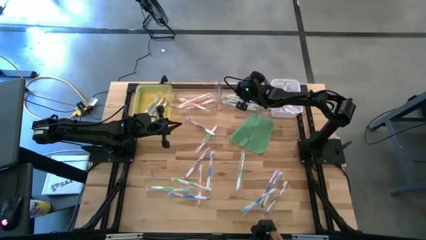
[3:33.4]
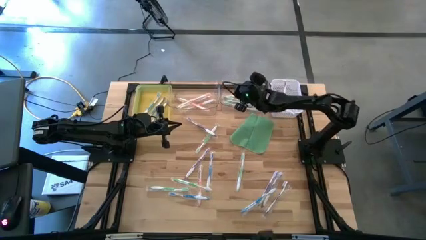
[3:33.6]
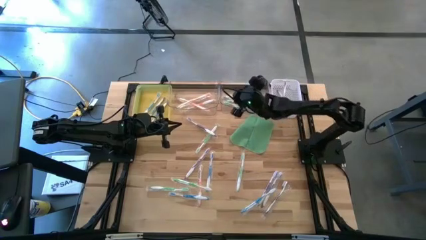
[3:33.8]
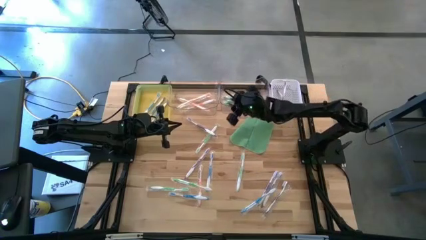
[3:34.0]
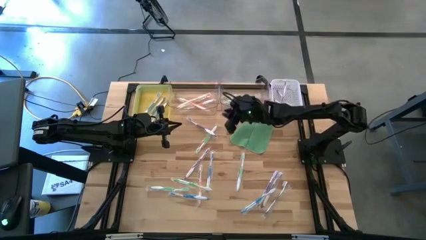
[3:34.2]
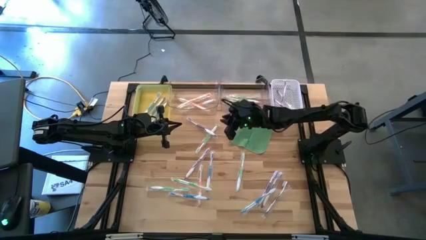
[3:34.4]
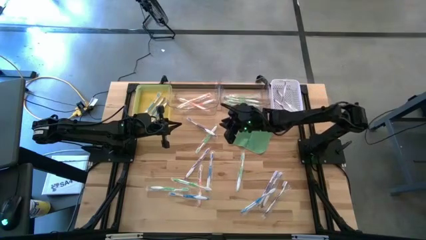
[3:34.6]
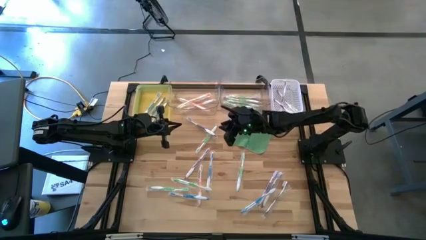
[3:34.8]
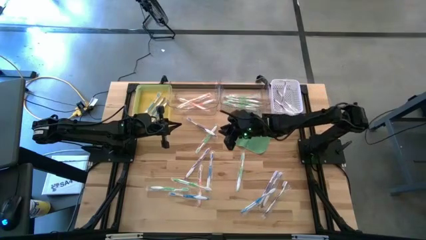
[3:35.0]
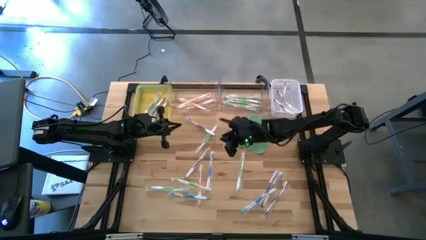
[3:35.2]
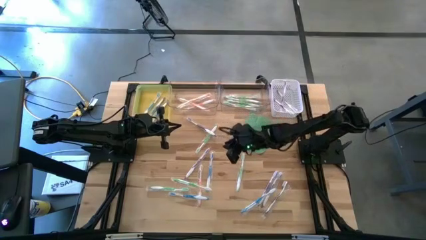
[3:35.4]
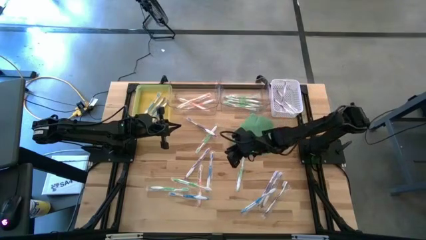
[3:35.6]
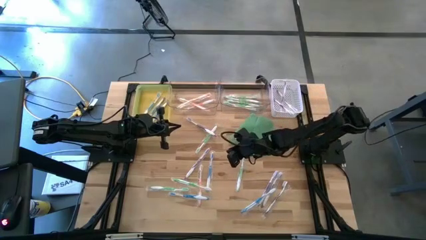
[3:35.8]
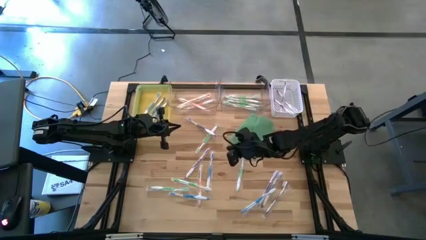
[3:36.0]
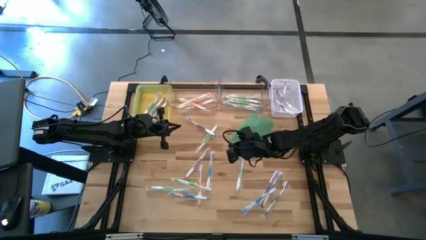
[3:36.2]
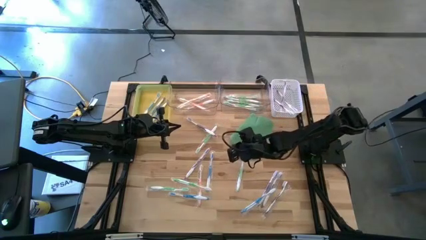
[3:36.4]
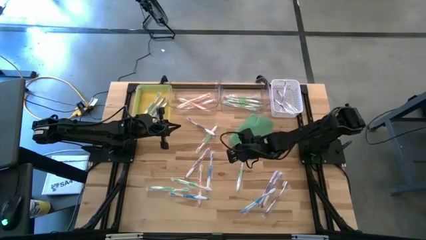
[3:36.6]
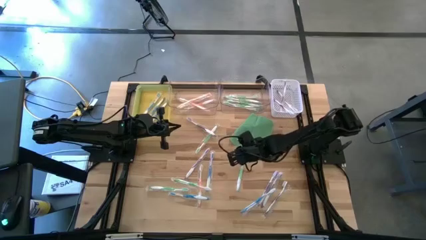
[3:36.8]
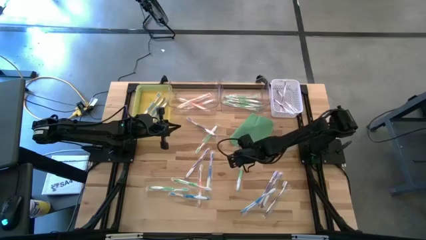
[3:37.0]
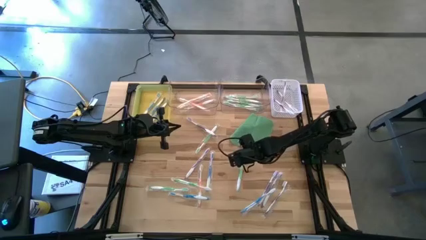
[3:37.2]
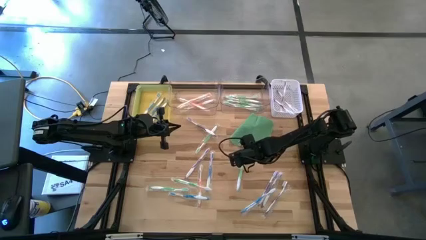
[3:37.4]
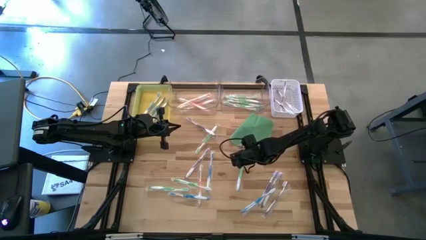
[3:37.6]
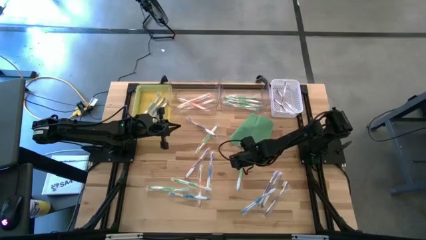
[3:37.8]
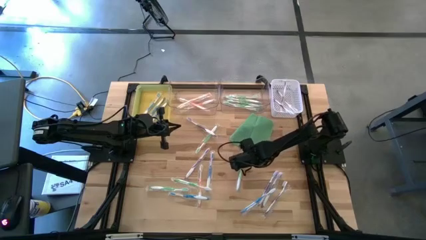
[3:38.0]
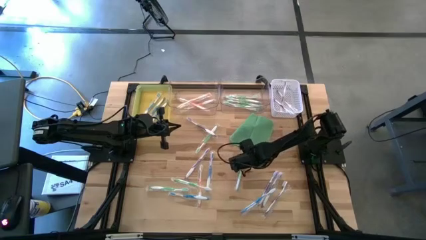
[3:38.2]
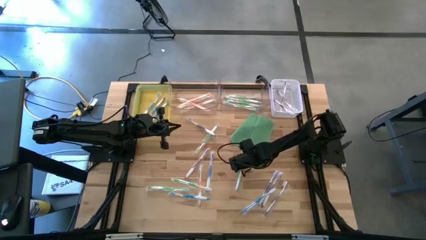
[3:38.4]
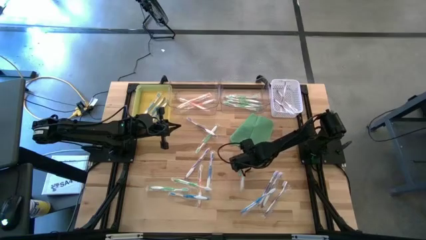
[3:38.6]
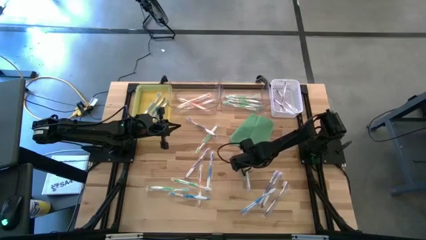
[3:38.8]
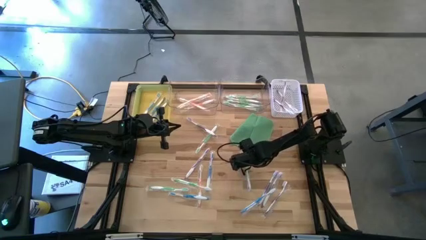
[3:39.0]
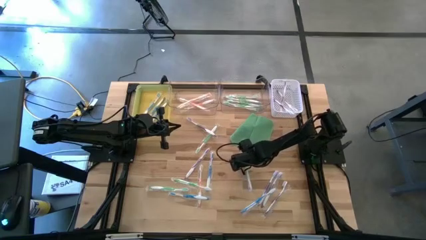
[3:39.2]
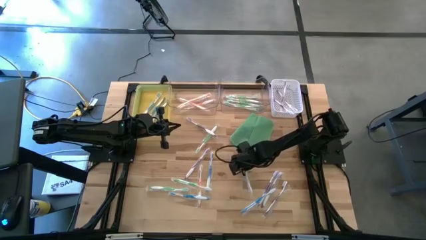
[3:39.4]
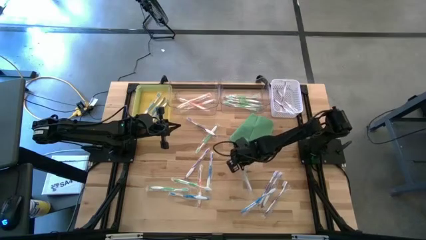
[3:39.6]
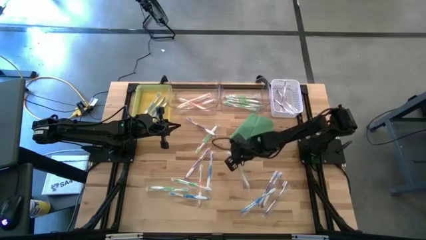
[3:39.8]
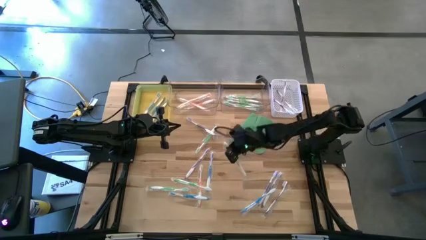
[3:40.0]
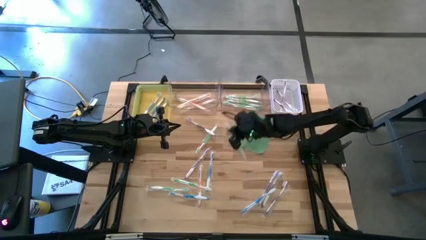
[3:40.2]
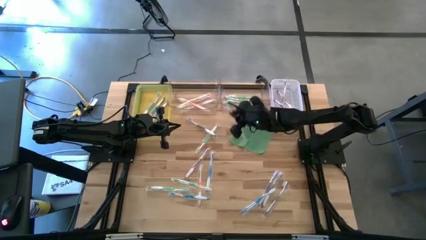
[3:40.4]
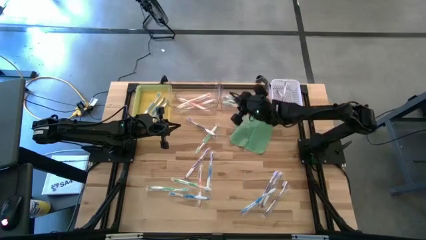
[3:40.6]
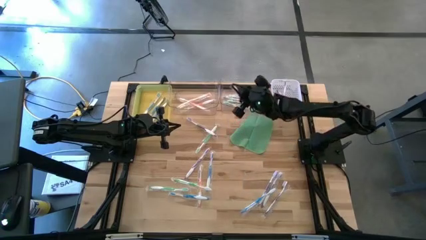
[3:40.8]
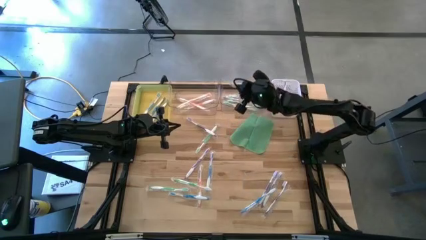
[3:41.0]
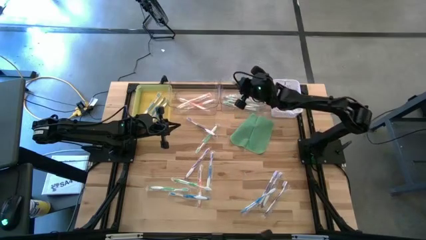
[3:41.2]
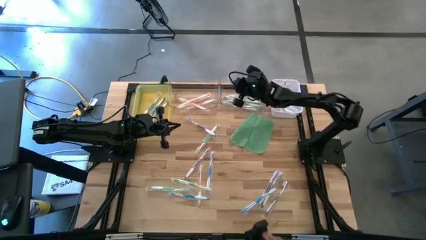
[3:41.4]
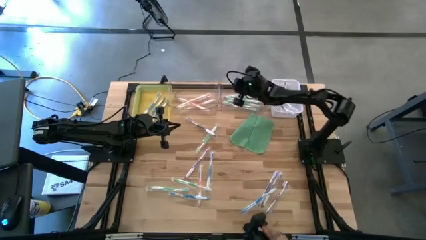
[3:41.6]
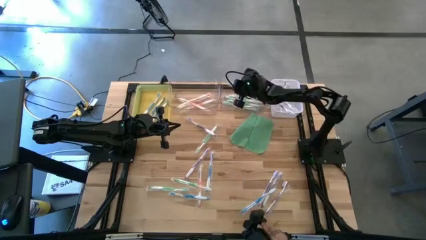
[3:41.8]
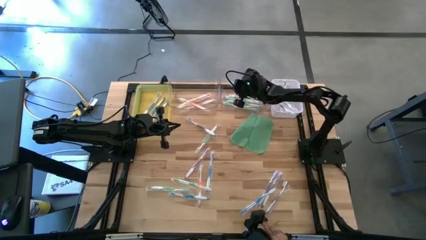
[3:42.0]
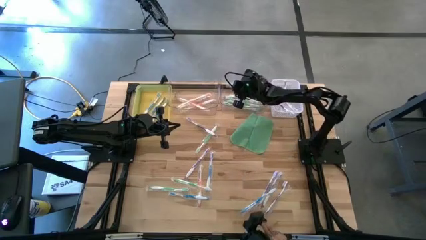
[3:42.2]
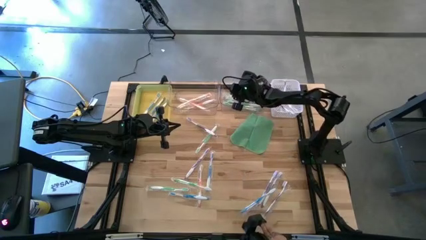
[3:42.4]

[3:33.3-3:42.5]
Task: Pick & Place Toothbrushes
Put the green toothbrush into the right transparent bin

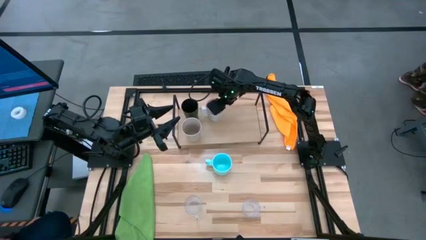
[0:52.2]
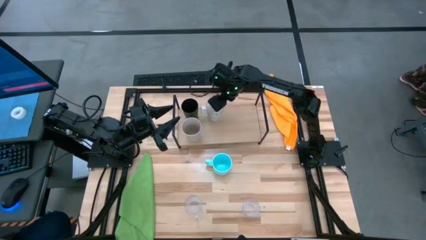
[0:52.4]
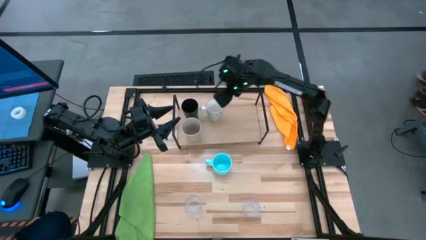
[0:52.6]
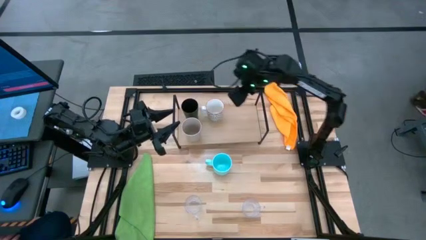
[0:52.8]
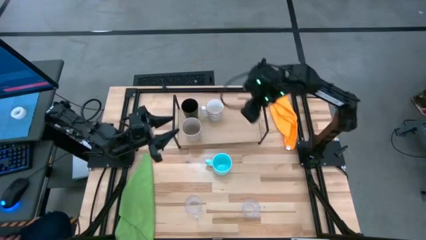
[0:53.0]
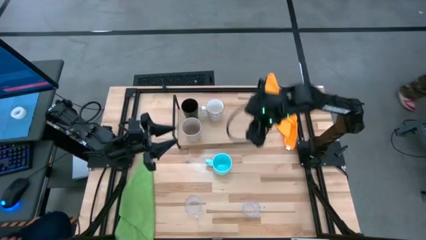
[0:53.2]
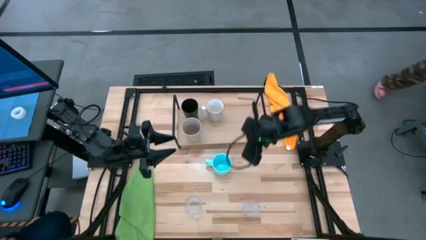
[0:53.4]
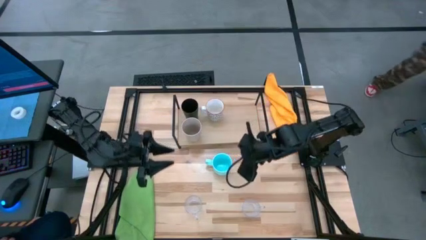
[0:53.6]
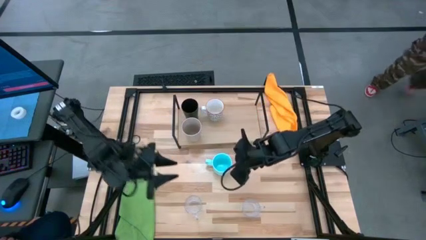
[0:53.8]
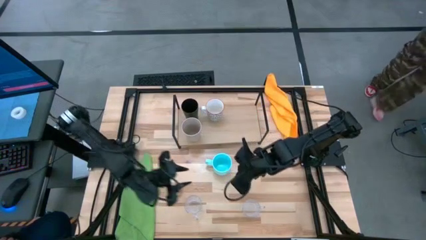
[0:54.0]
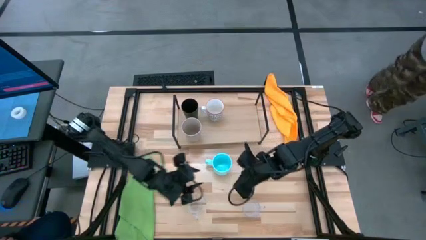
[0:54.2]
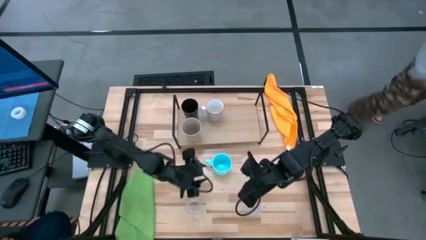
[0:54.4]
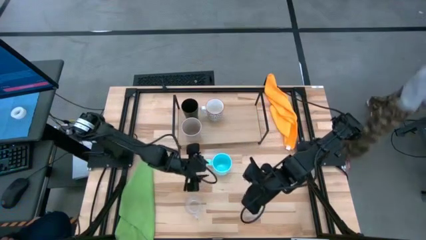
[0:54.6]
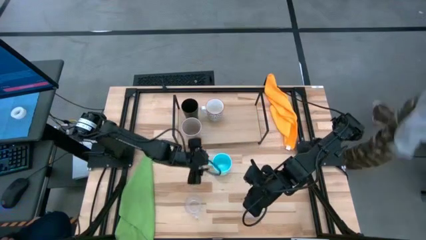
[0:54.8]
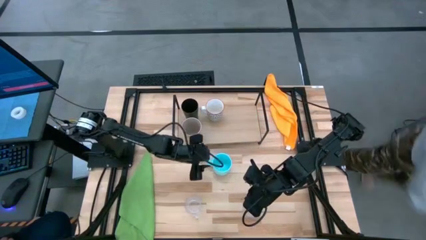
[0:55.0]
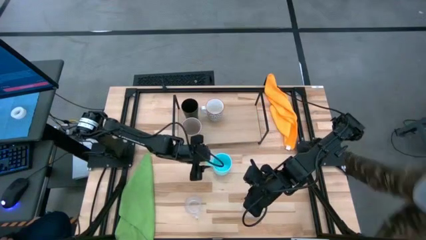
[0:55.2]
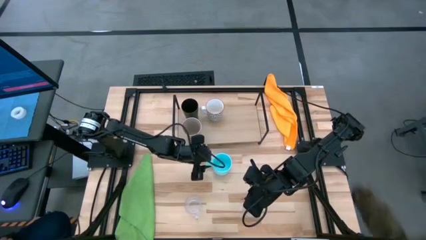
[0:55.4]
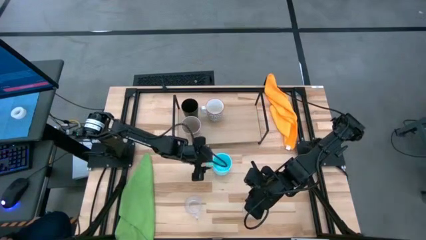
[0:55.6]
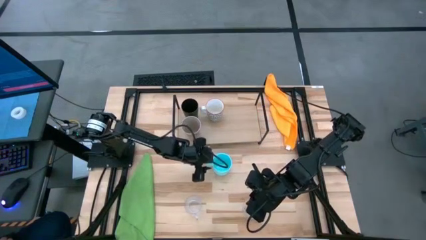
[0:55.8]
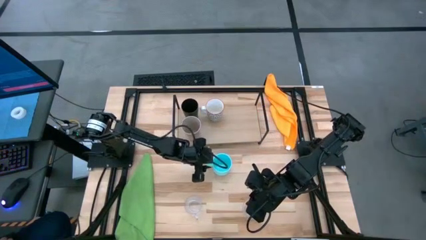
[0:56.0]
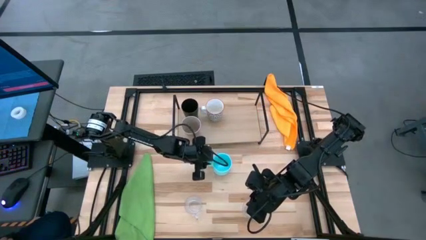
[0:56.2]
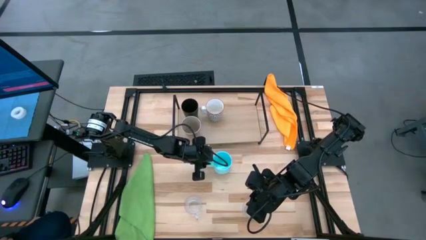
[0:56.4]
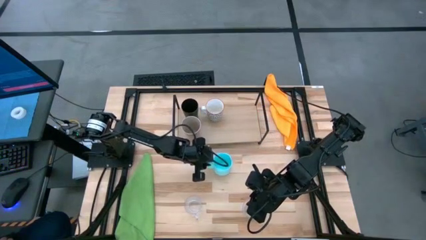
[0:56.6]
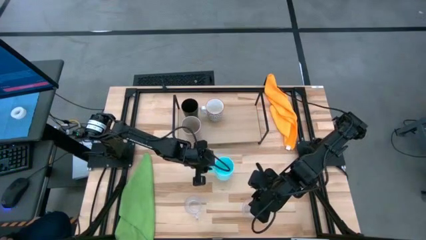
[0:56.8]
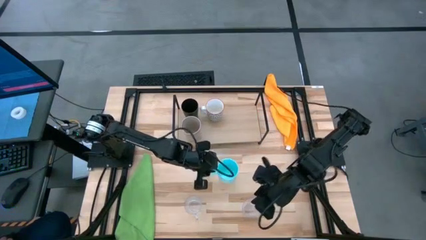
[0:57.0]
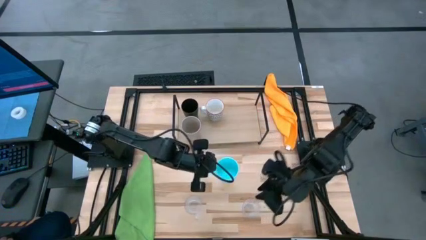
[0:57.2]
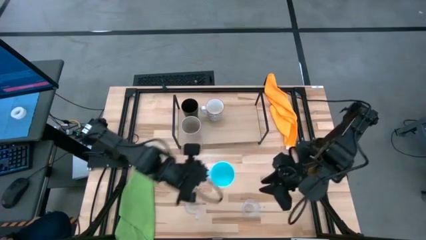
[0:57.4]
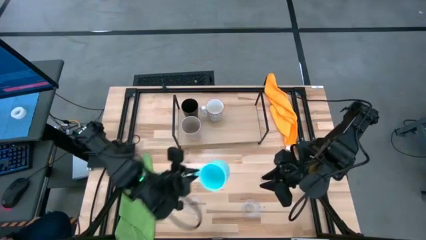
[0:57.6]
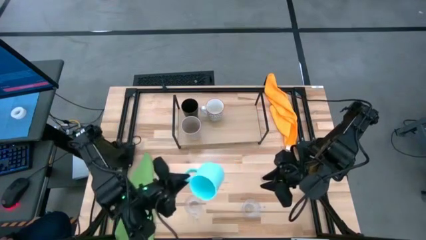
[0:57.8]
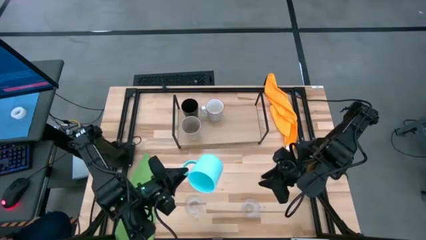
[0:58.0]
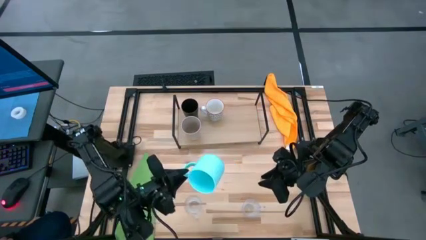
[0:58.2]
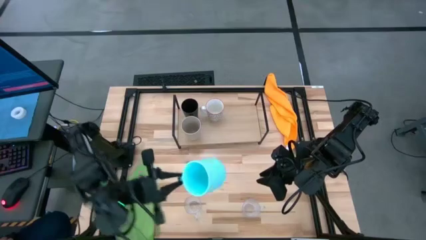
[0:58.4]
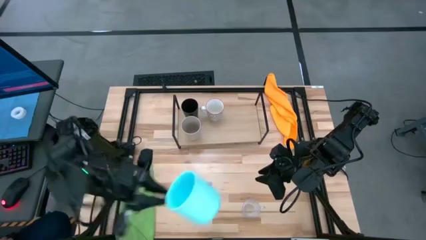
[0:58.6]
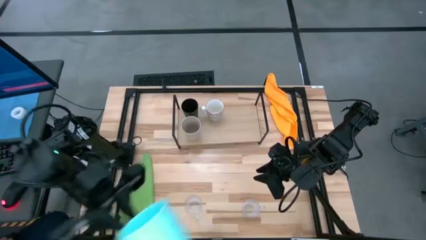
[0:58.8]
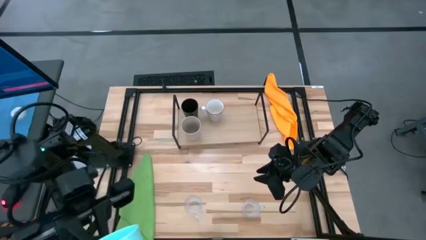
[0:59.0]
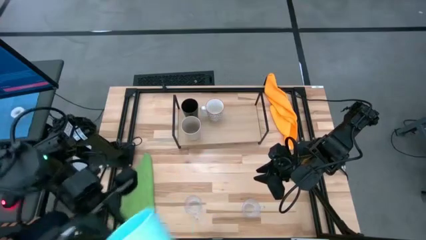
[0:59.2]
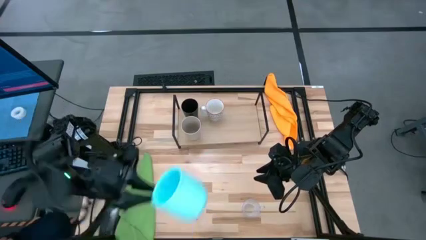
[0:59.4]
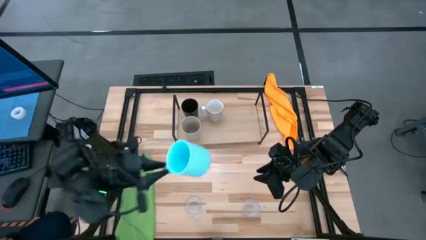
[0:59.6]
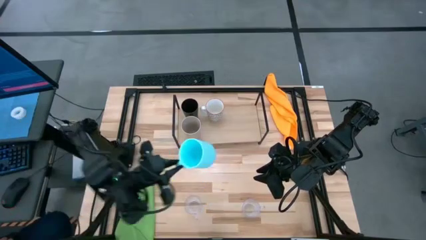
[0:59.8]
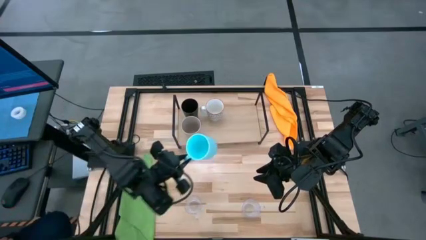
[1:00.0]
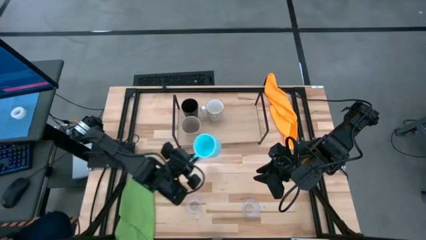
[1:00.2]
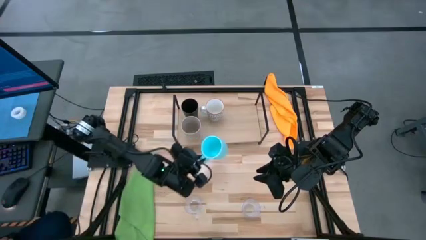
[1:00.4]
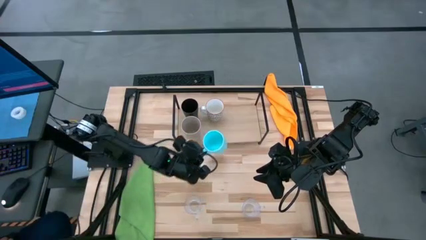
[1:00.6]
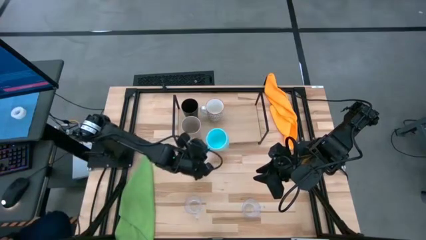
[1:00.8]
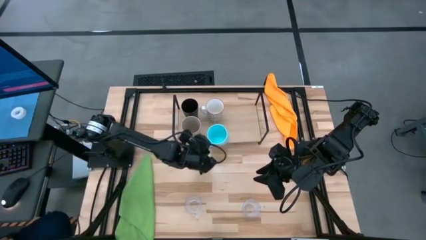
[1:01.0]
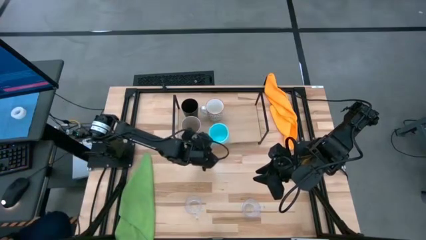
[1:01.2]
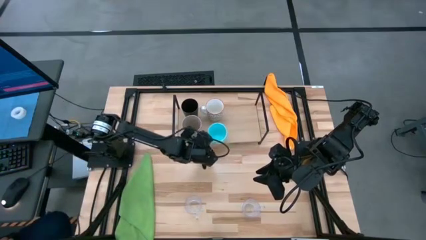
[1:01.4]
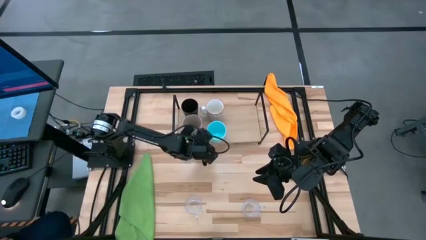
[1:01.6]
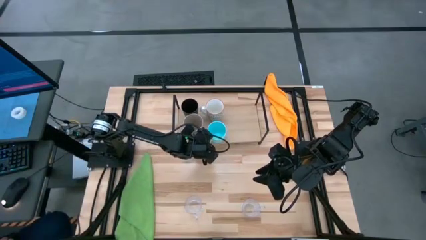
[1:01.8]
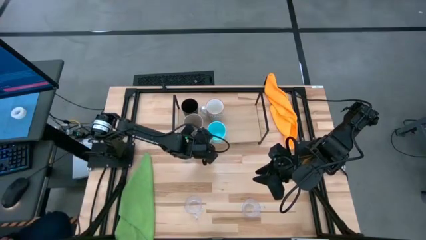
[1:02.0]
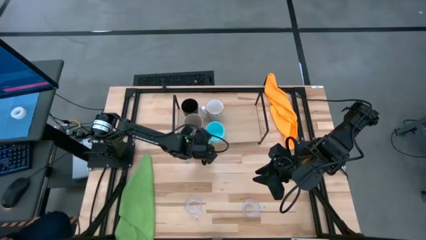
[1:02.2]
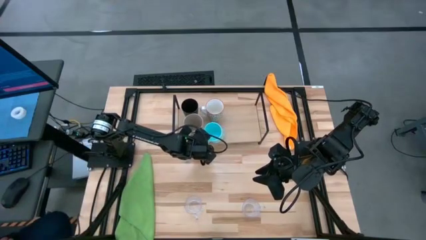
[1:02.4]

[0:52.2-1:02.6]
Task: Stack small to large cups/mugs on shelf
Put the blue mug on the shelf
